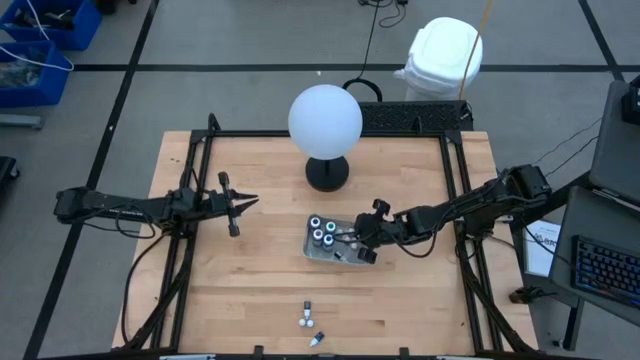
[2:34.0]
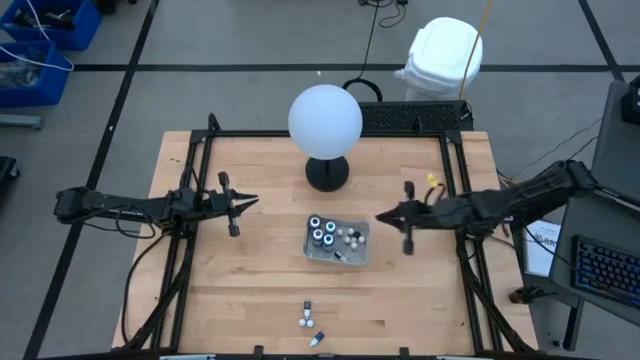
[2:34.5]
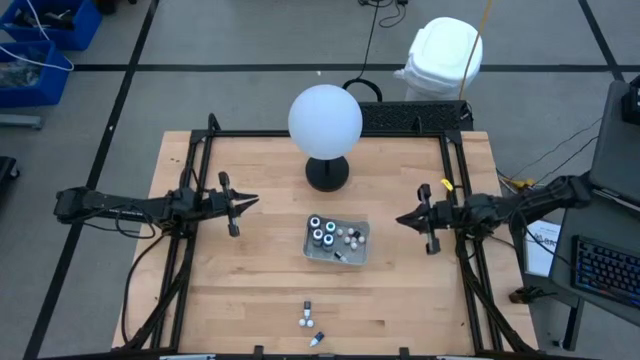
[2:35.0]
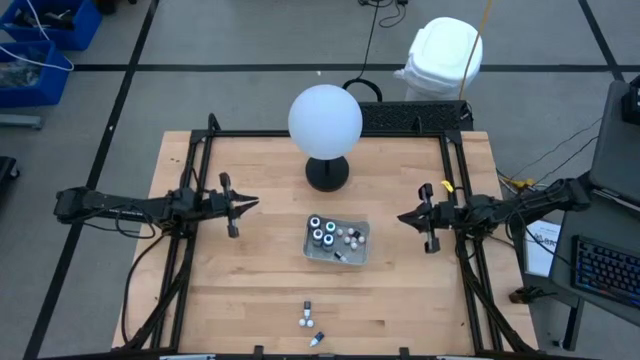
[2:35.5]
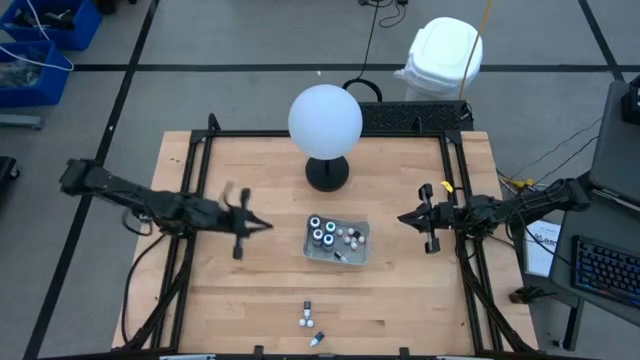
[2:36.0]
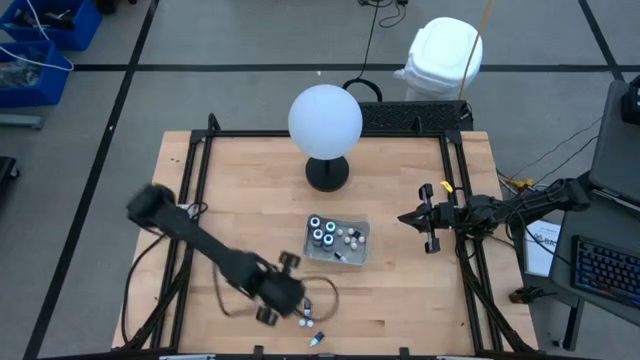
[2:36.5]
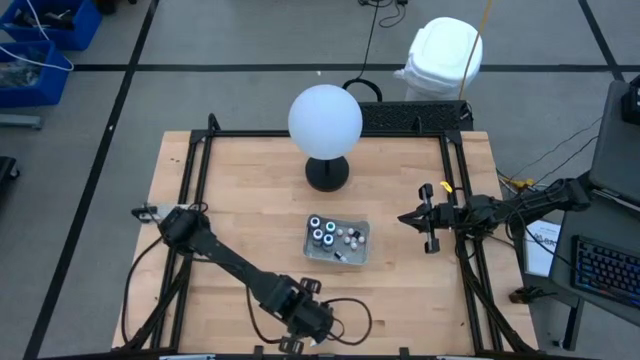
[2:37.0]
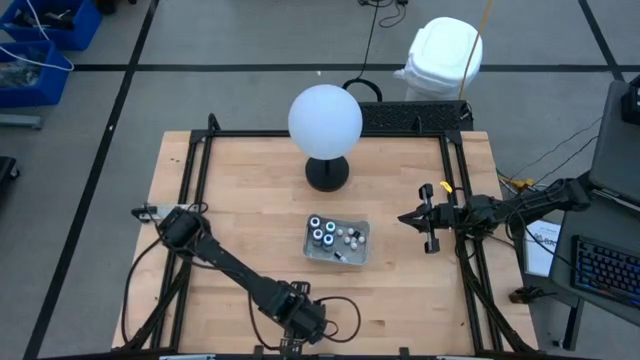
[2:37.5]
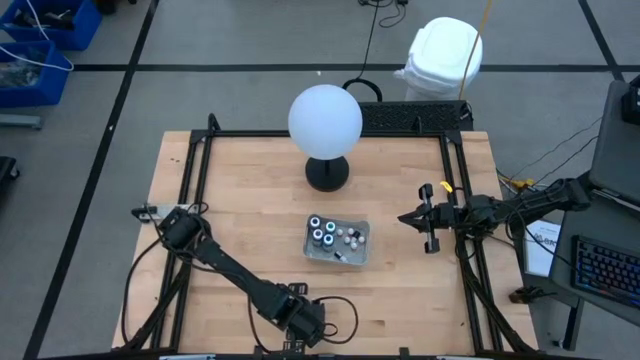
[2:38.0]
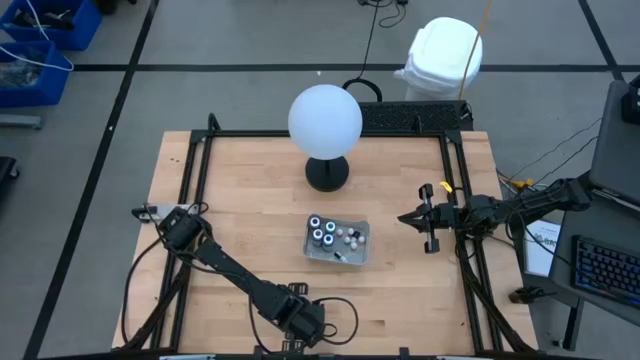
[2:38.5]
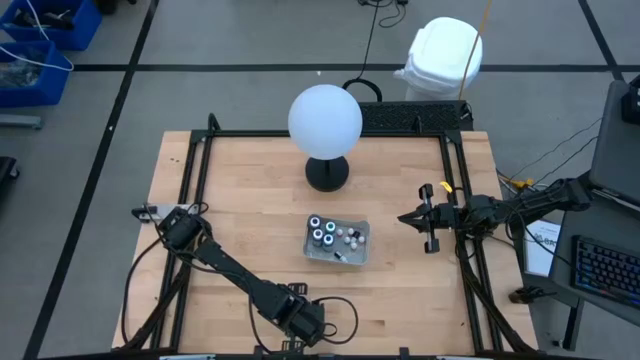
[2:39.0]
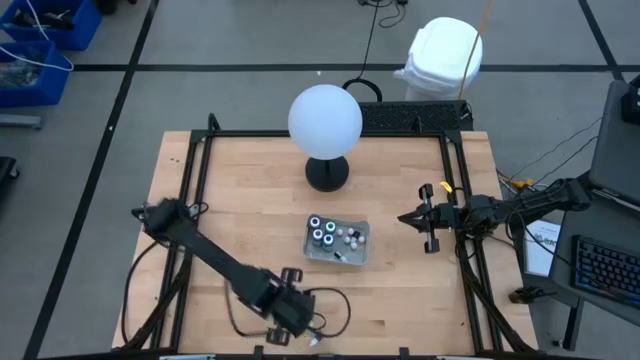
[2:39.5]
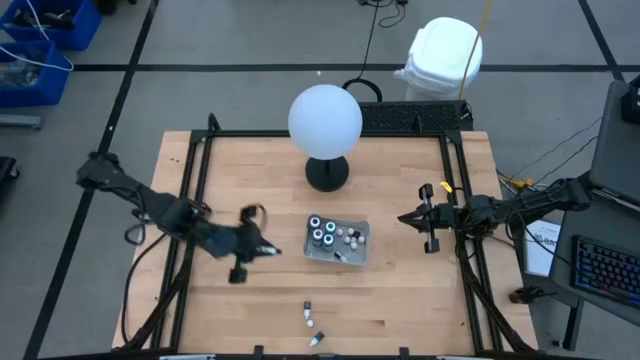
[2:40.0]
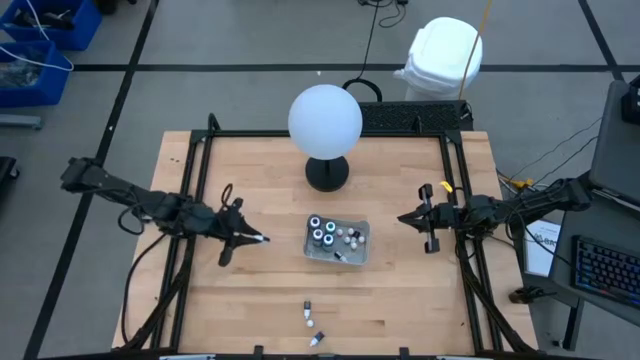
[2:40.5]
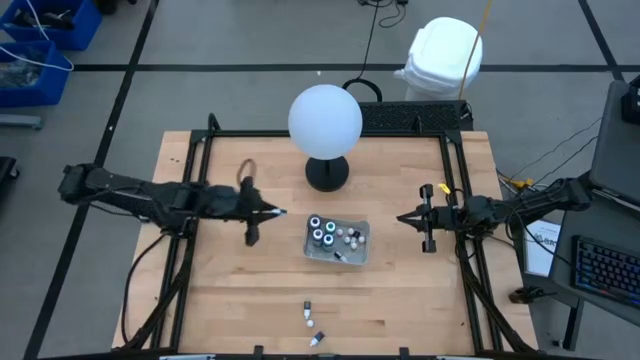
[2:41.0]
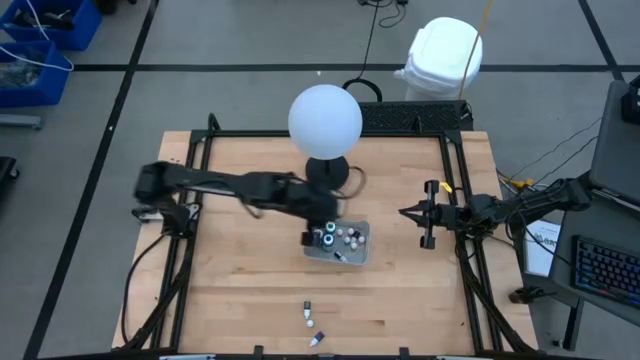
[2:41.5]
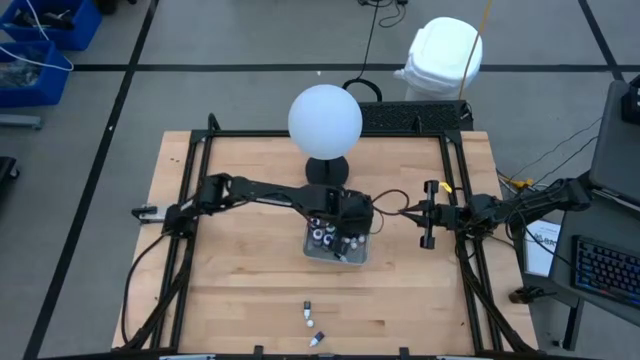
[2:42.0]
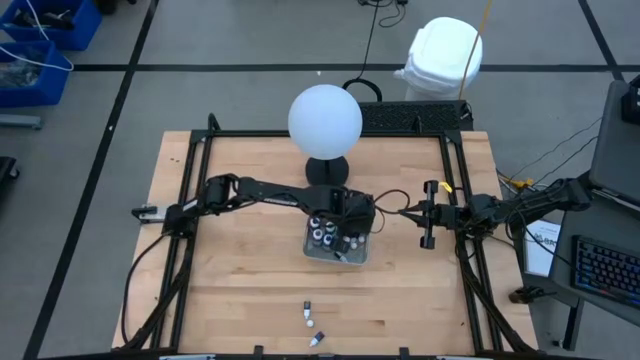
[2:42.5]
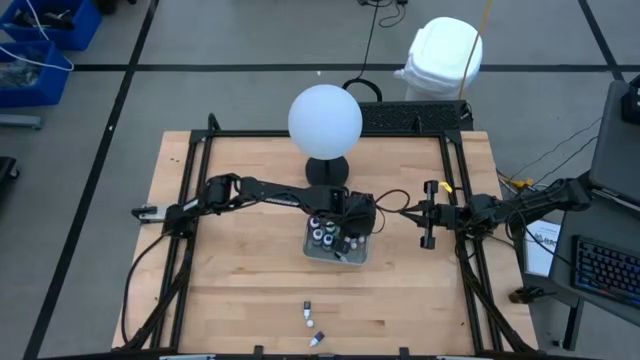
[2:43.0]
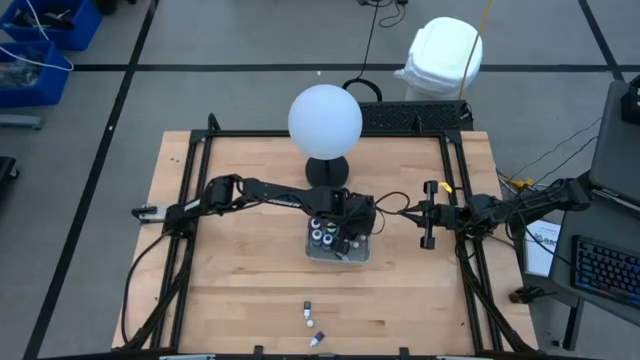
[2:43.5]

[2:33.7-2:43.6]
Task: Pick & Place food coloring
Put the small green food coloring bottle into the gray bin

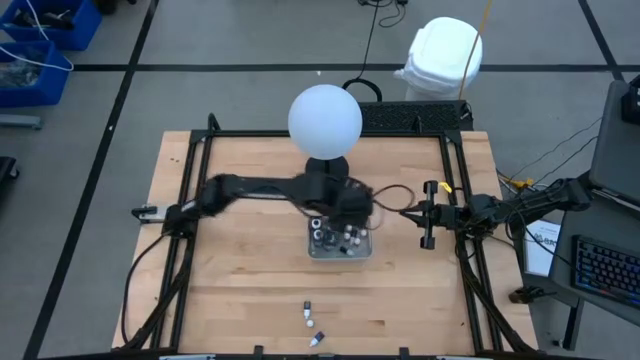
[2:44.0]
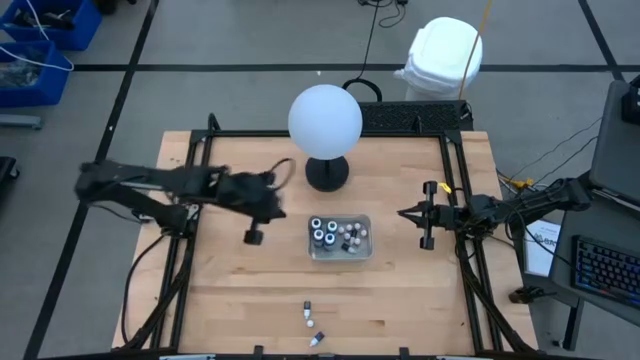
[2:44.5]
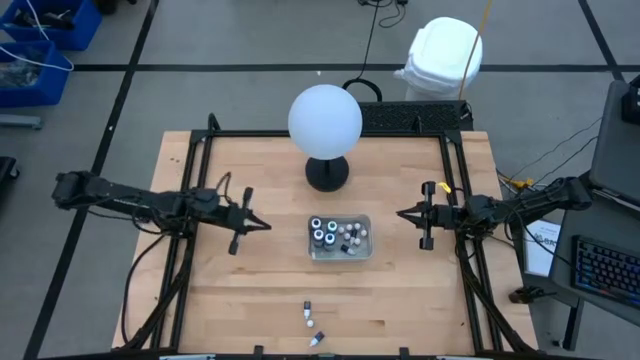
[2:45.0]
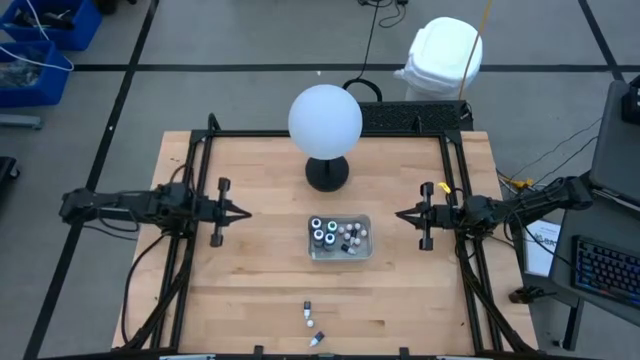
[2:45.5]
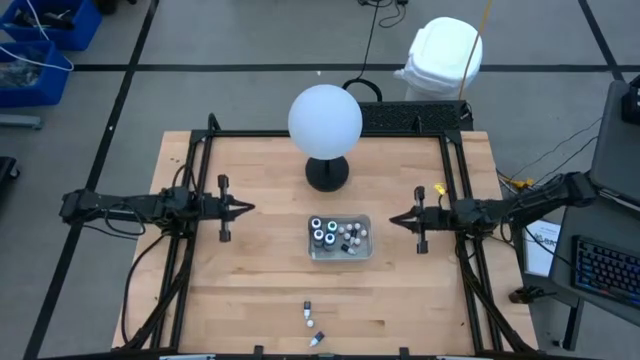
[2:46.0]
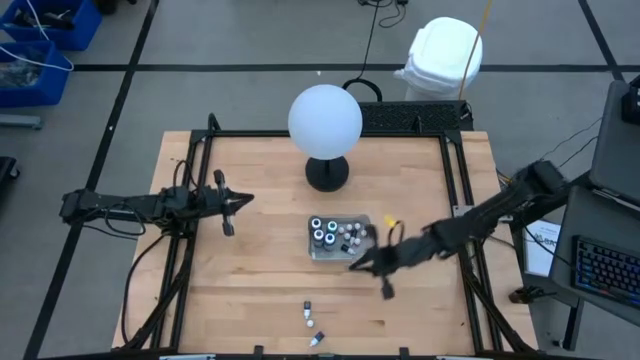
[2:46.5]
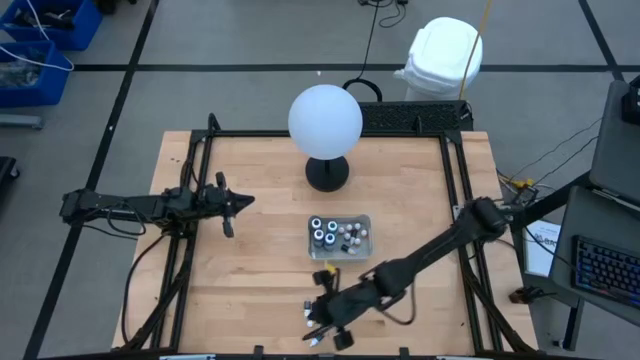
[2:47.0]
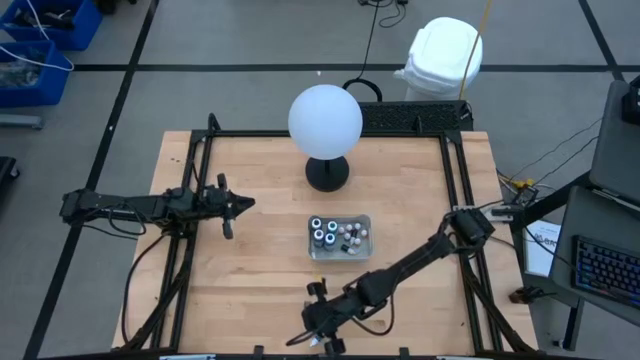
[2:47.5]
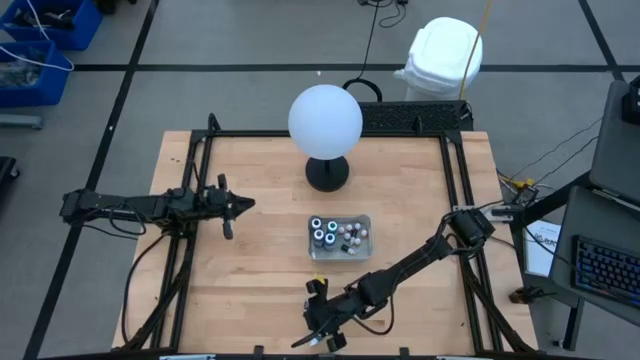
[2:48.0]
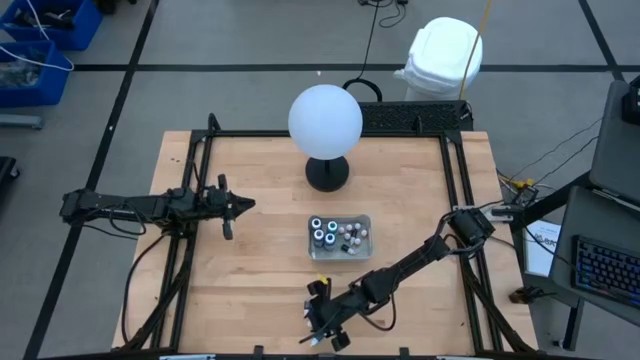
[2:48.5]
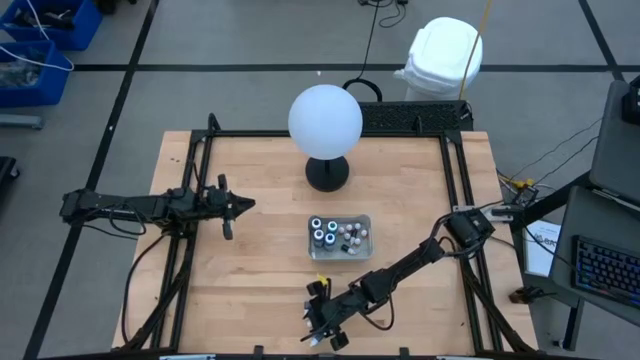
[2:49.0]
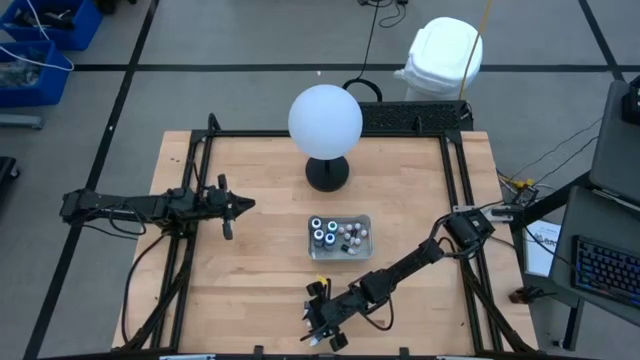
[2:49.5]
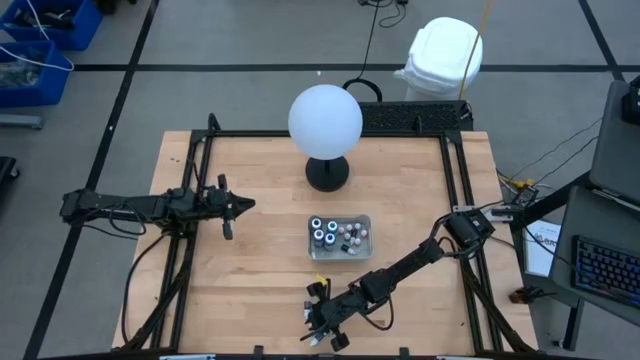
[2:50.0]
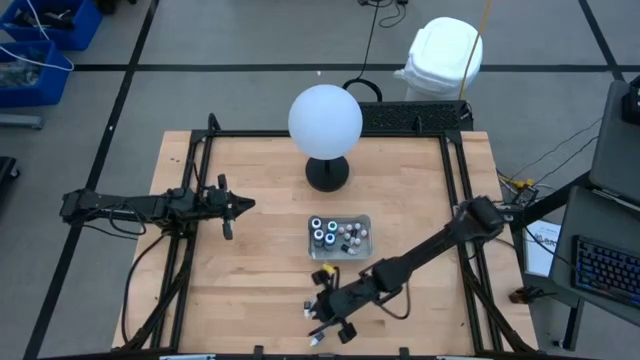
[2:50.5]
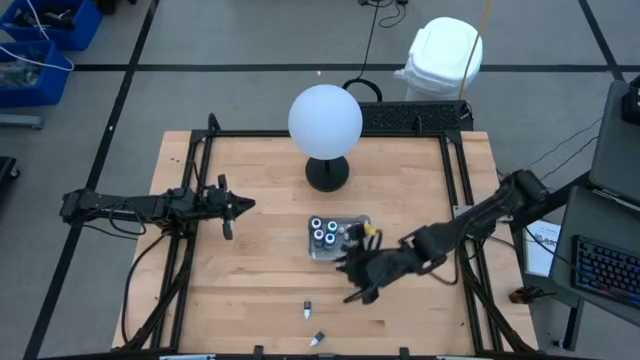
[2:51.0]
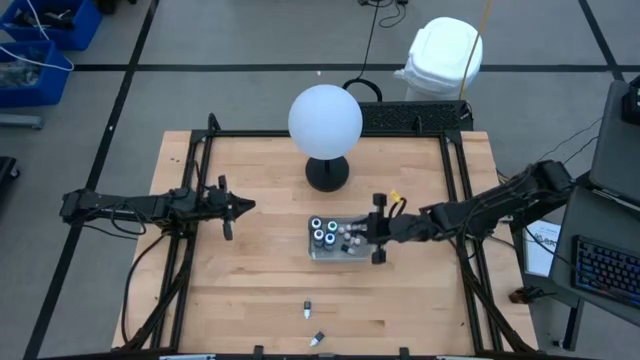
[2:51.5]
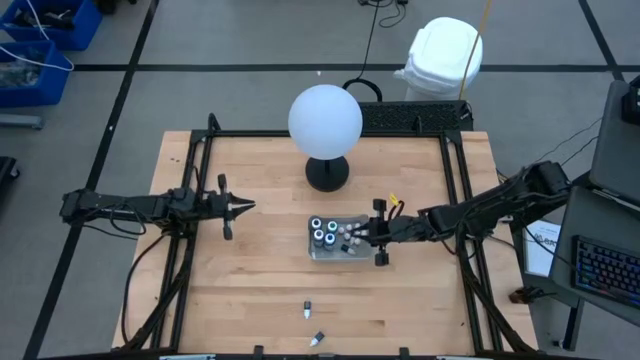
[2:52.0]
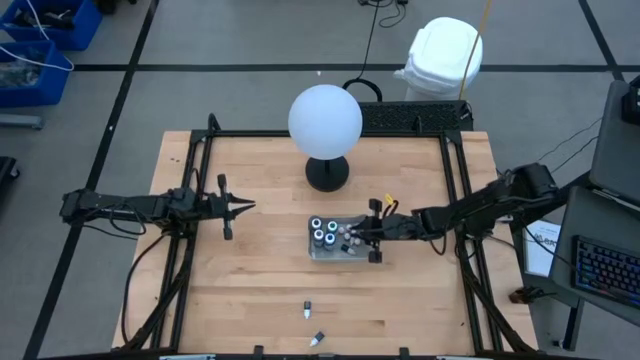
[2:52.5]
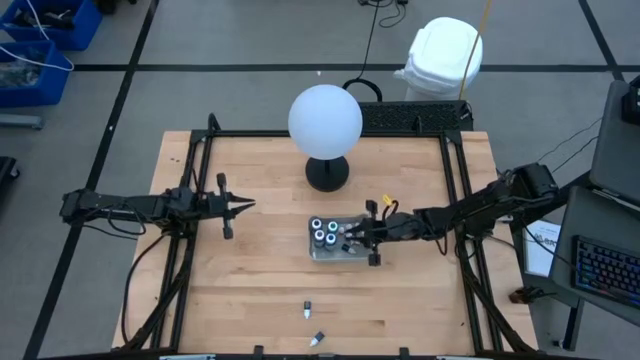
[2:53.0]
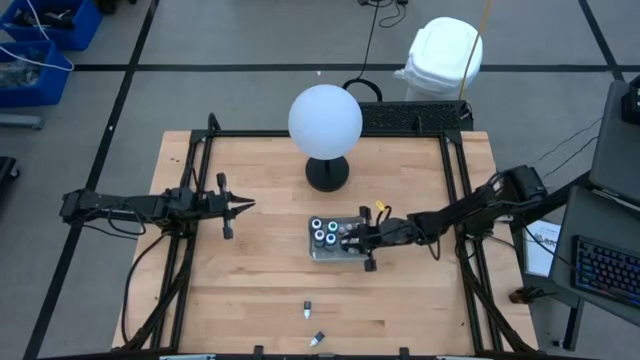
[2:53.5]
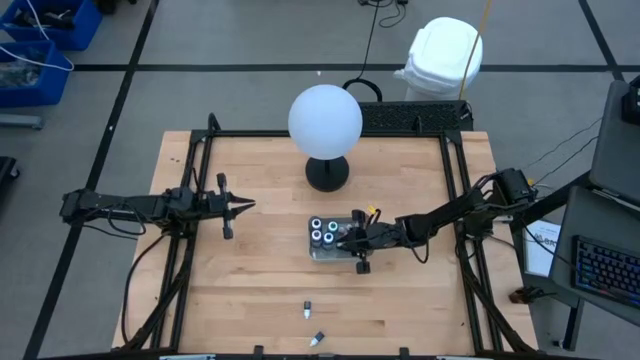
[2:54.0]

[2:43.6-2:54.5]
Put the small orange food coloring bottle into the gray bin
